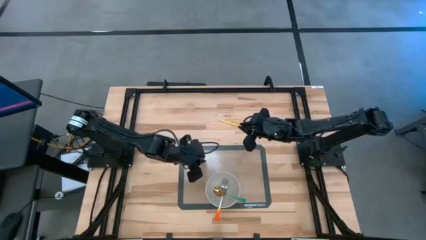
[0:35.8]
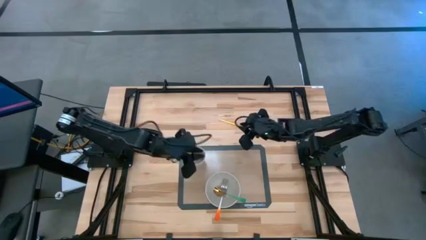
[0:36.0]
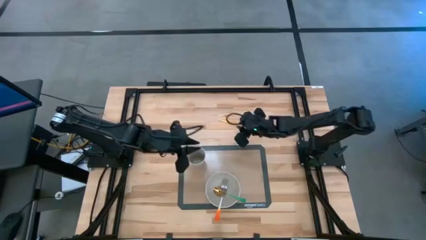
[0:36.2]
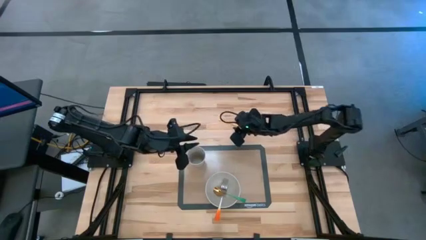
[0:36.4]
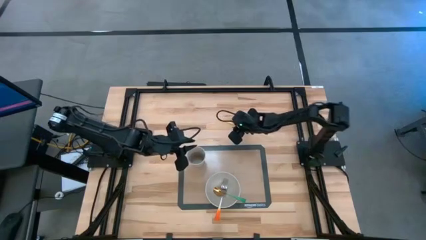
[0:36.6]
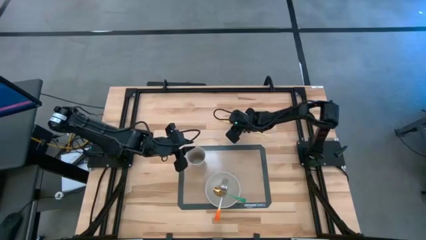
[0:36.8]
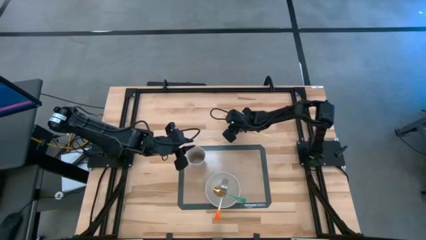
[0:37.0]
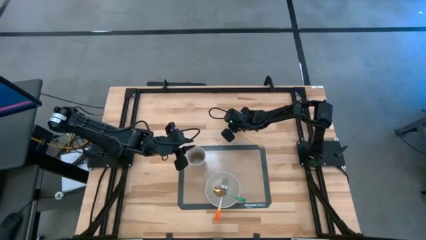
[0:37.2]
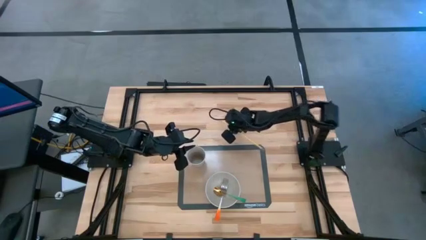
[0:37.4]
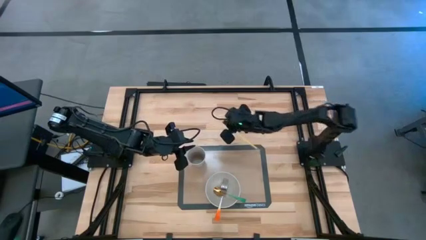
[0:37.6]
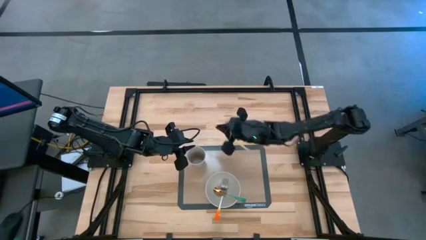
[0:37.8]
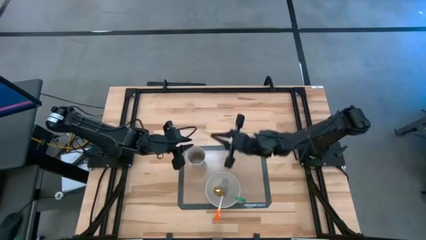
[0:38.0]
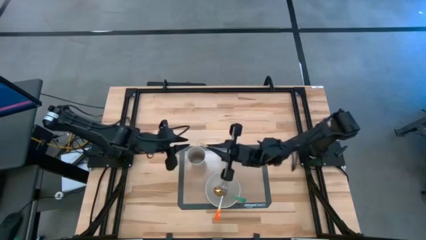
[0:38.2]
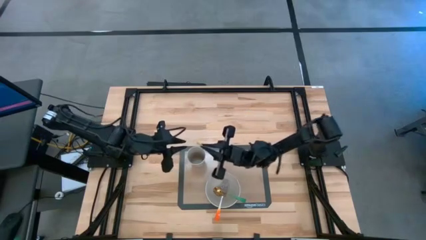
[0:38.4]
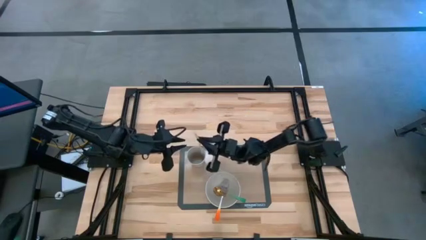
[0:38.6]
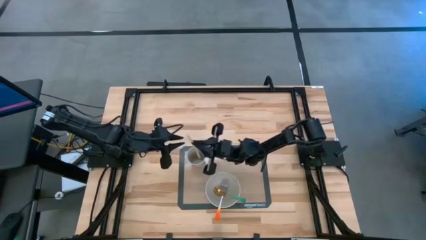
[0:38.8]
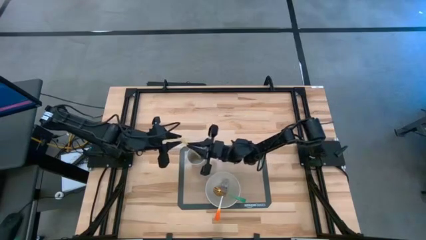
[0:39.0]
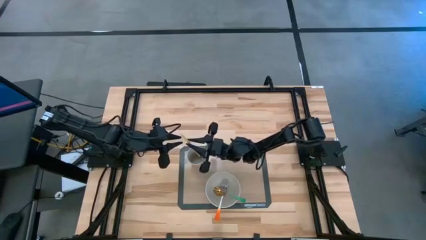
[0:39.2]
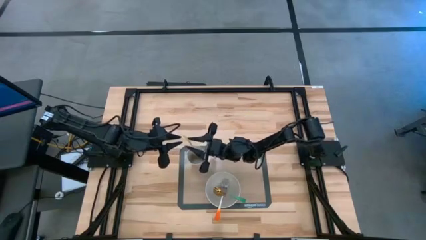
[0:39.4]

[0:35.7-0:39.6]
Task: Pick & Place Utensil
Put the straw into the cup on the silicone mat

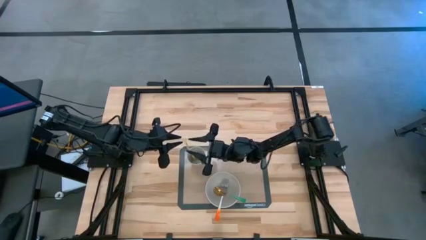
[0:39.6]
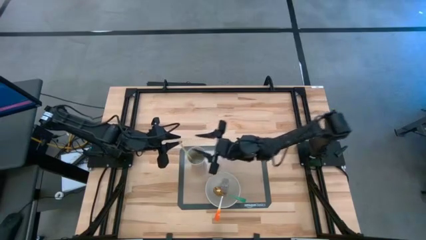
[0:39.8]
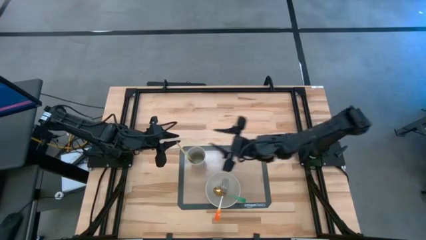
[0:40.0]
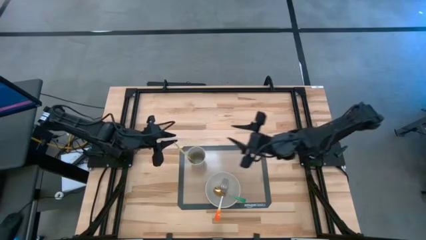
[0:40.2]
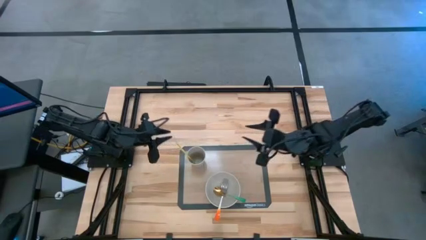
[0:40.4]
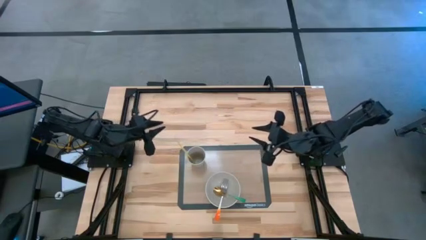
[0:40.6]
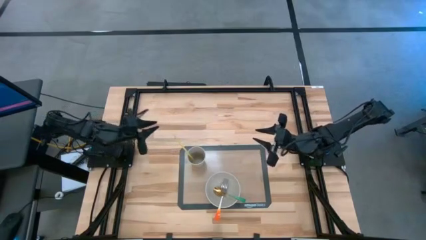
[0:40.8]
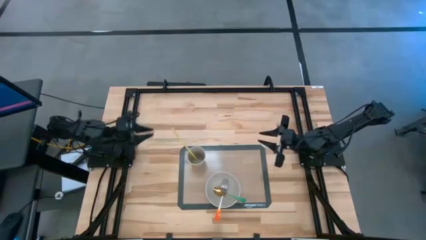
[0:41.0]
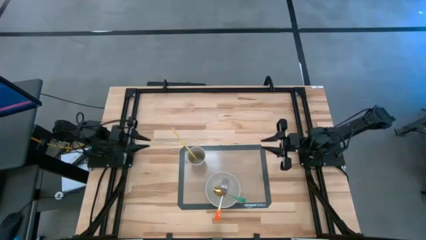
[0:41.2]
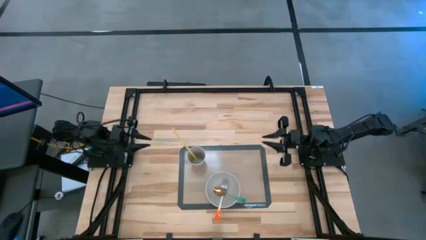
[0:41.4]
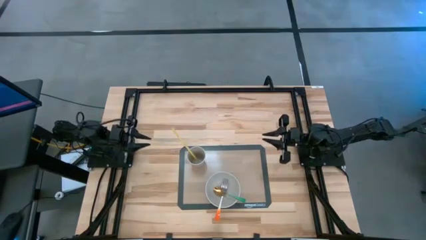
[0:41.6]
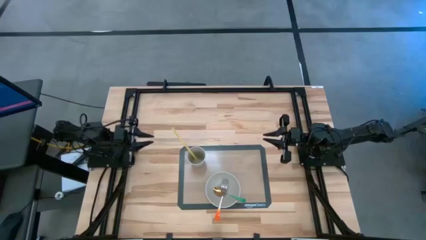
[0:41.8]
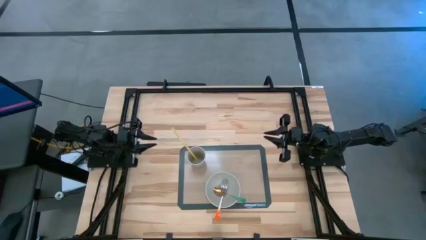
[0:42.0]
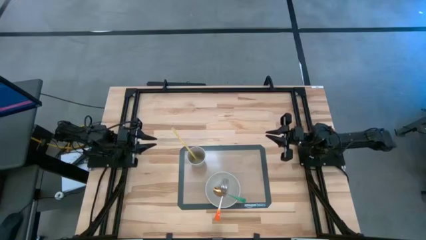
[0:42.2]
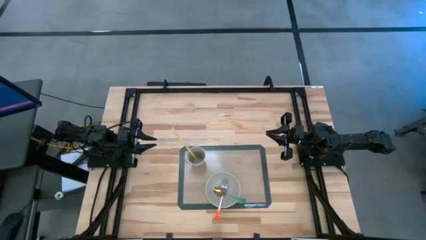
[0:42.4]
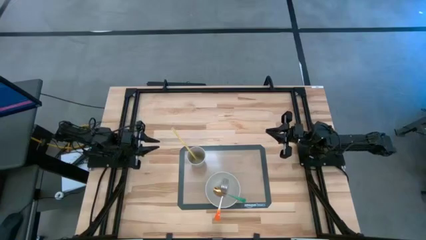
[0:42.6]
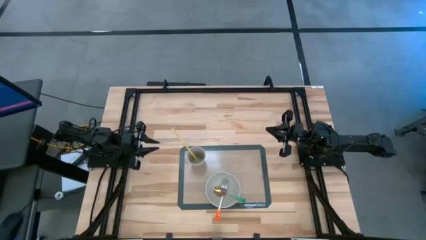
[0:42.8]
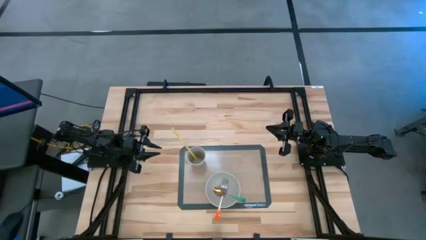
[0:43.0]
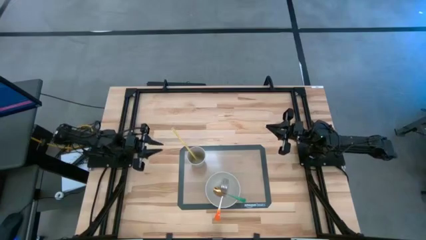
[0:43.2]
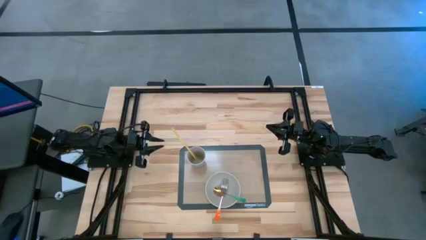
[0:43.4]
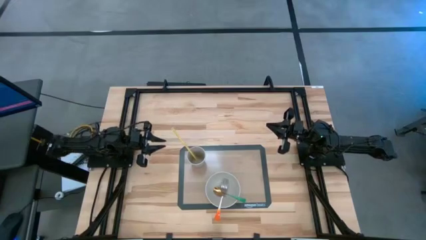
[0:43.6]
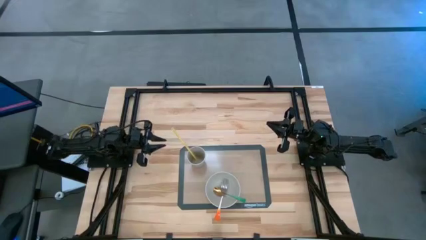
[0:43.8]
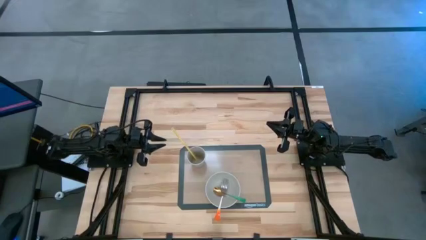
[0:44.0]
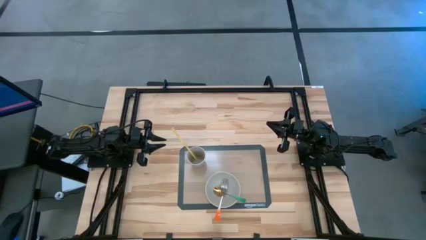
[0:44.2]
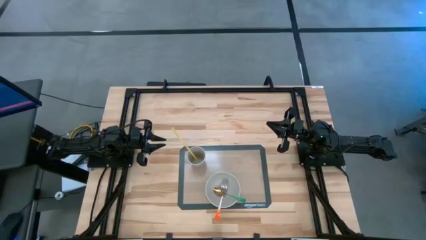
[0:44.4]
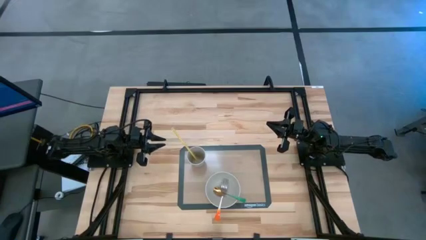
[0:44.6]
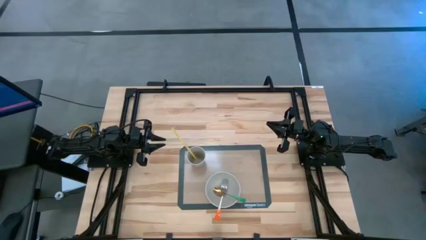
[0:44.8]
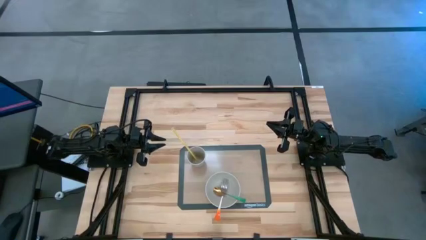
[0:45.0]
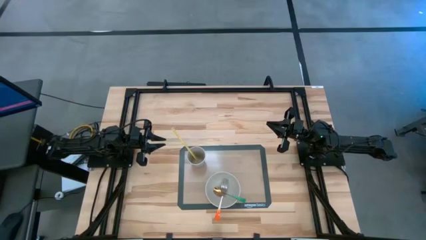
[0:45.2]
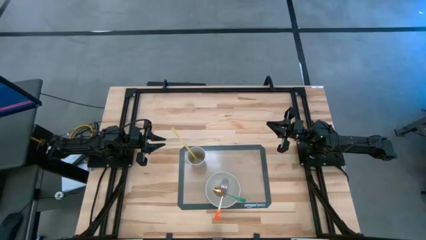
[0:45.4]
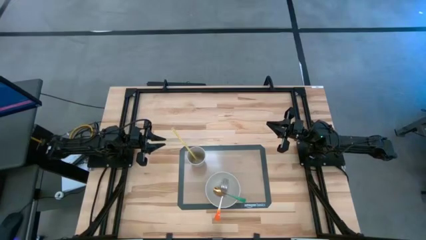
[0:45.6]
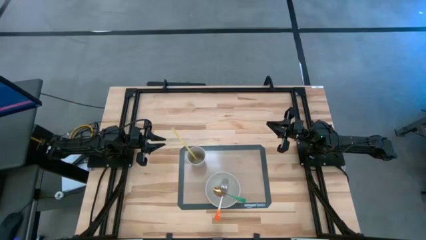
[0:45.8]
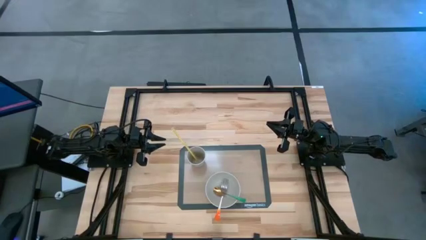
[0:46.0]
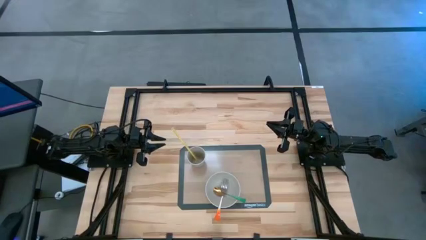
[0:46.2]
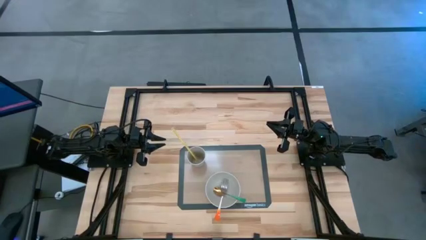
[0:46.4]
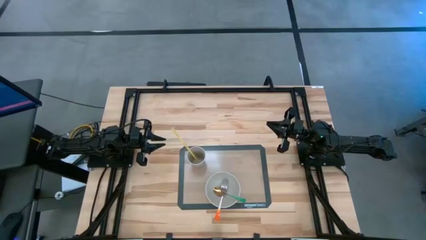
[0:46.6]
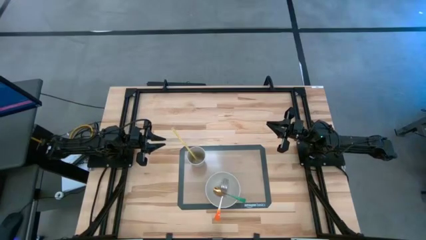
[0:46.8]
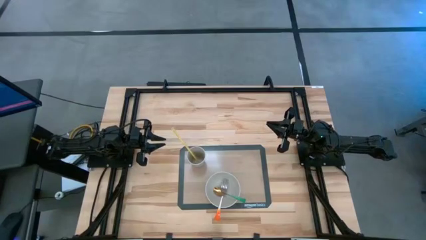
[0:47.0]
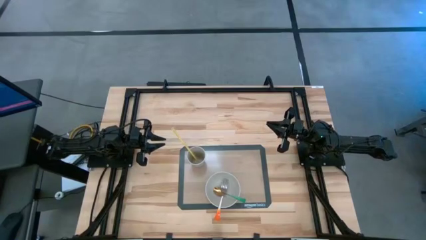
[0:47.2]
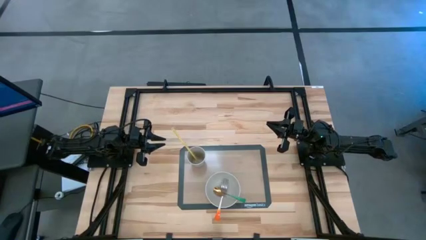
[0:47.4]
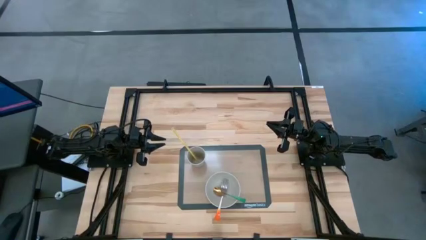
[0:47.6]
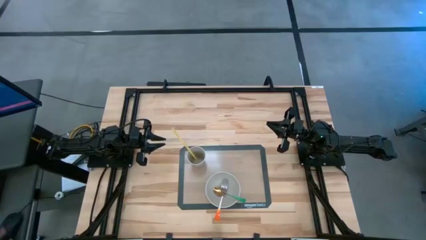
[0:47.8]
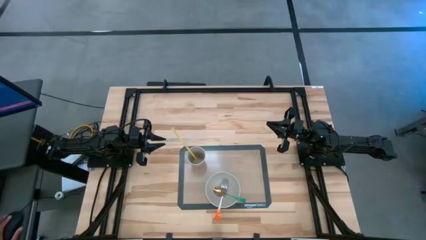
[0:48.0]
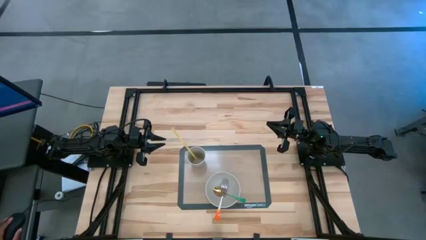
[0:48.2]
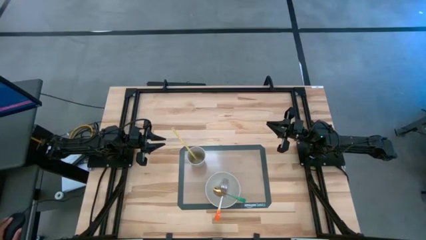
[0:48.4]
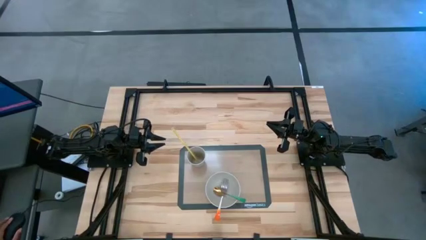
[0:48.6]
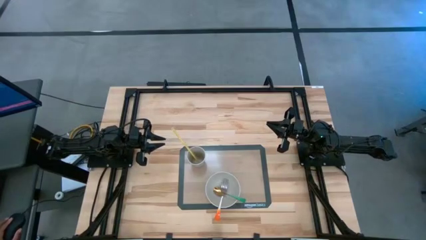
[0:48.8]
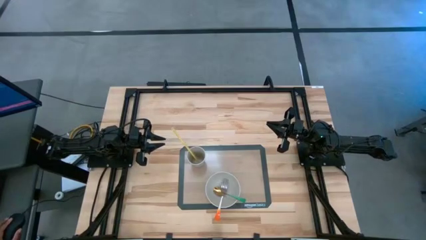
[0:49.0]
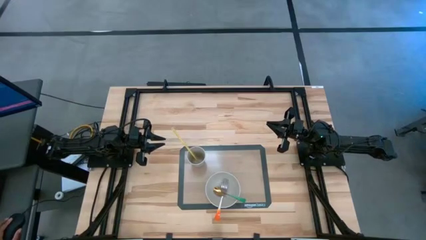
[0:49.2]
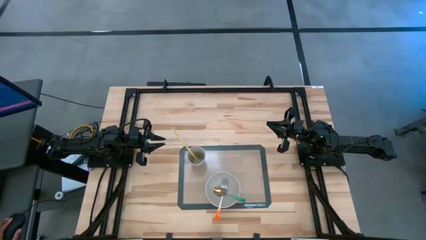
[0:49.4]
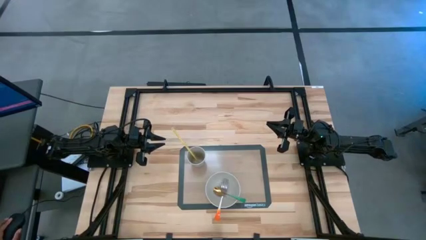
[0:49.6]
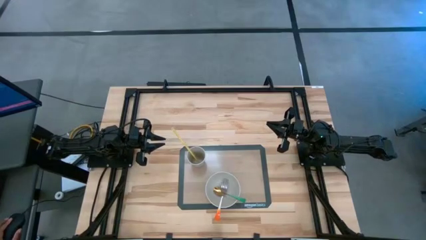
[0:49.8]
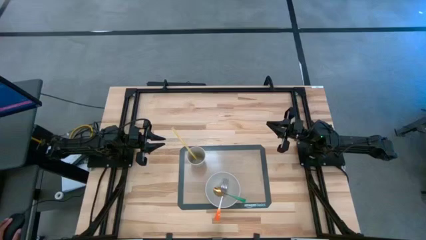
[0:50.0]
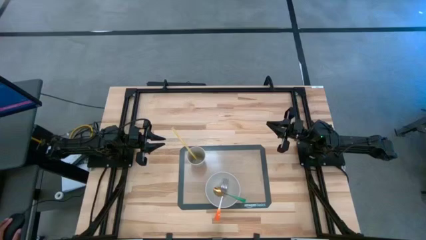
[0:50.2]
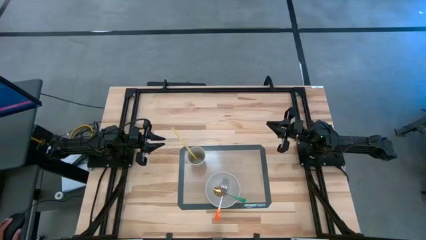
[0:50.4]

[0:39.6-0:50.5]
Return to Home Position
